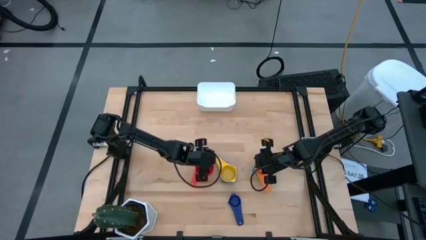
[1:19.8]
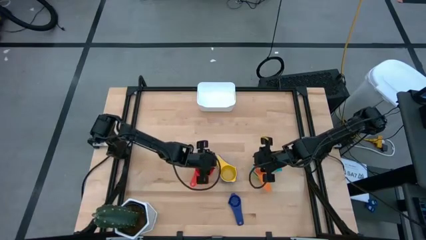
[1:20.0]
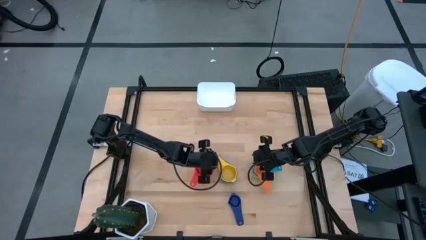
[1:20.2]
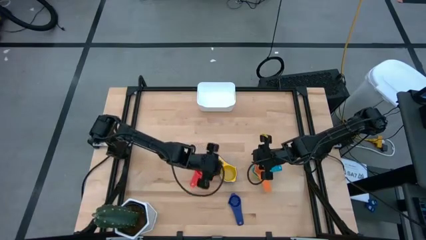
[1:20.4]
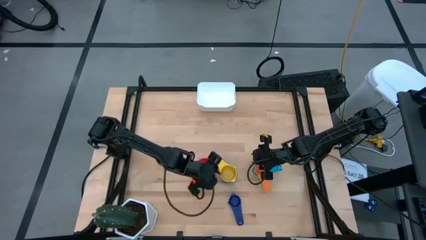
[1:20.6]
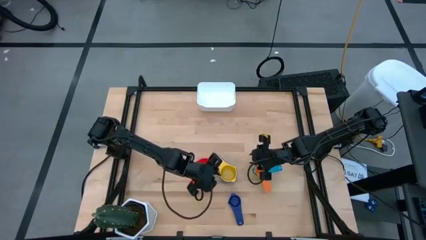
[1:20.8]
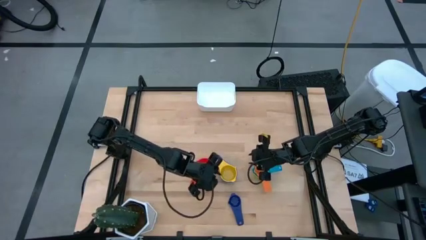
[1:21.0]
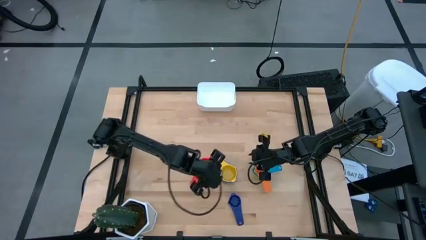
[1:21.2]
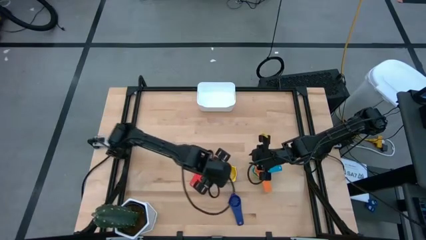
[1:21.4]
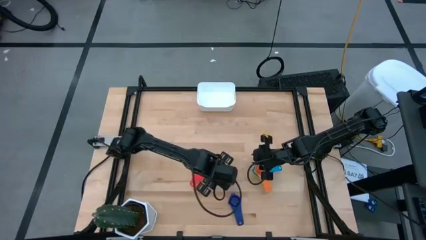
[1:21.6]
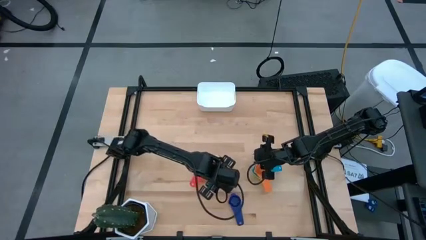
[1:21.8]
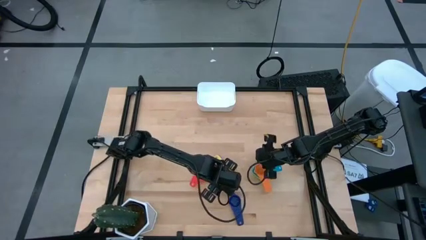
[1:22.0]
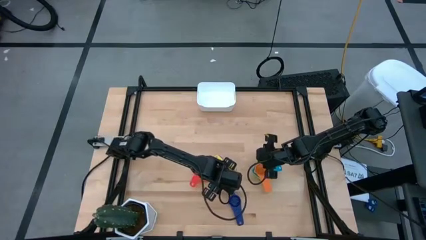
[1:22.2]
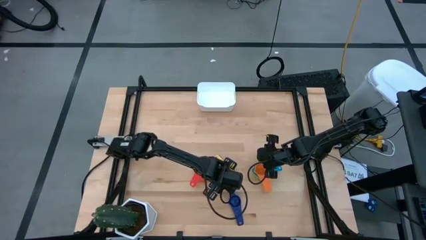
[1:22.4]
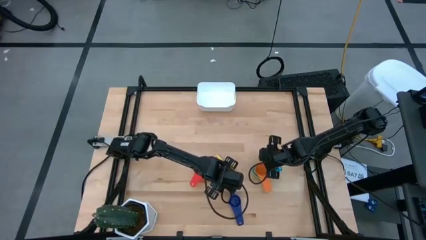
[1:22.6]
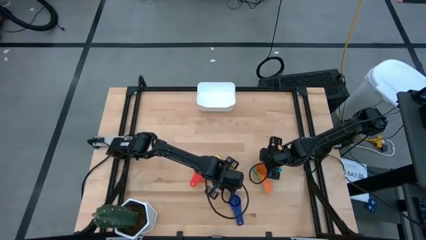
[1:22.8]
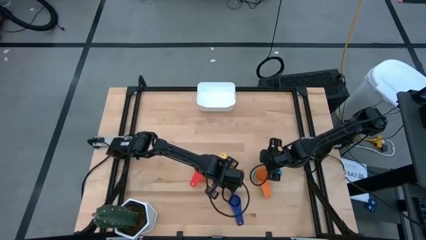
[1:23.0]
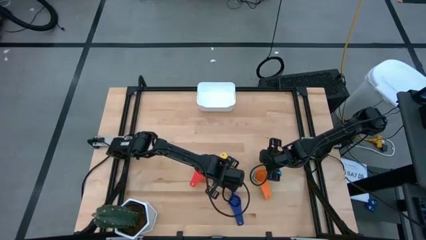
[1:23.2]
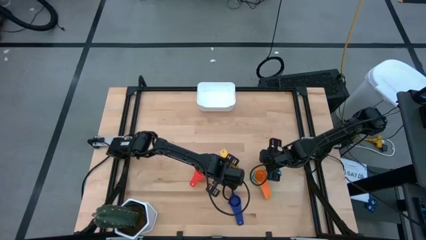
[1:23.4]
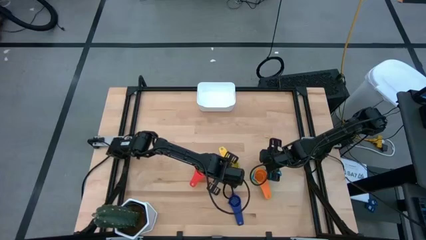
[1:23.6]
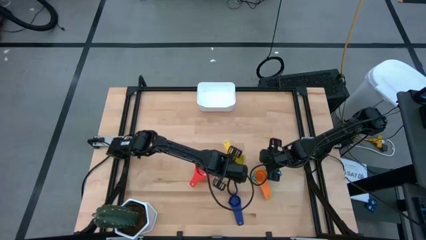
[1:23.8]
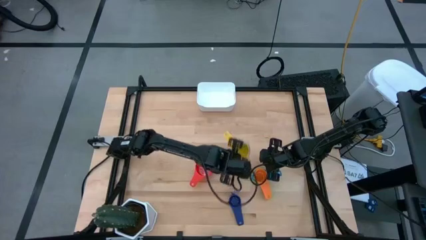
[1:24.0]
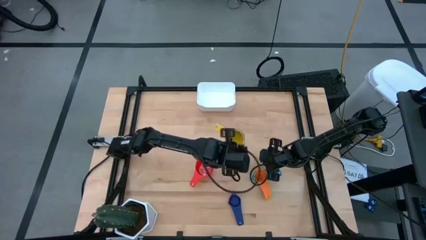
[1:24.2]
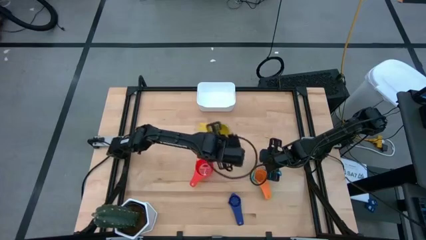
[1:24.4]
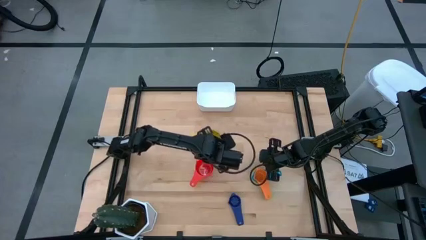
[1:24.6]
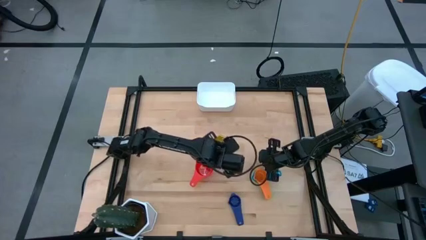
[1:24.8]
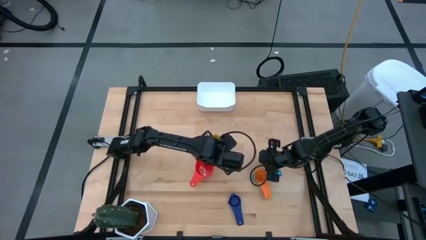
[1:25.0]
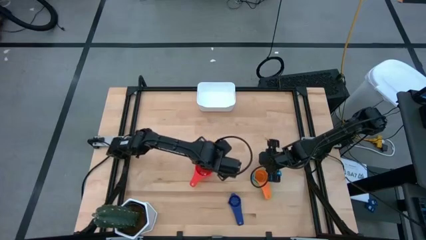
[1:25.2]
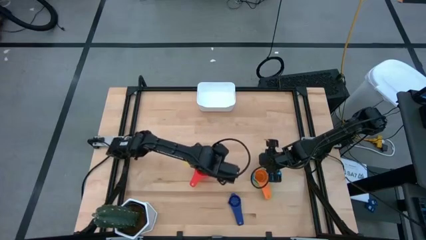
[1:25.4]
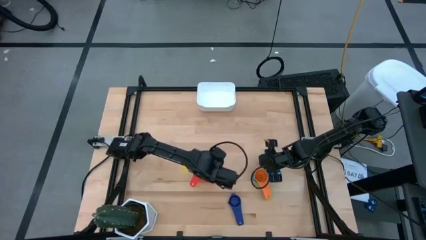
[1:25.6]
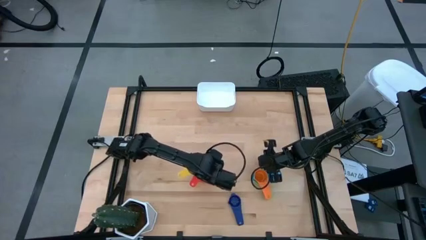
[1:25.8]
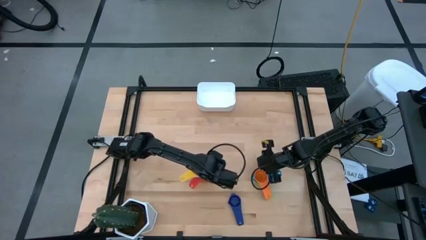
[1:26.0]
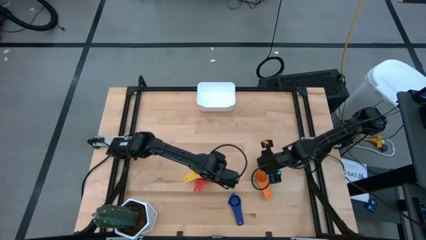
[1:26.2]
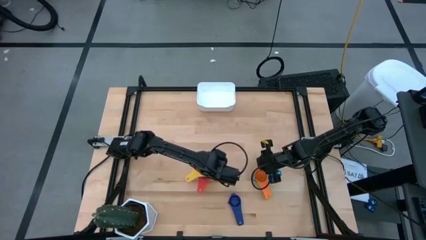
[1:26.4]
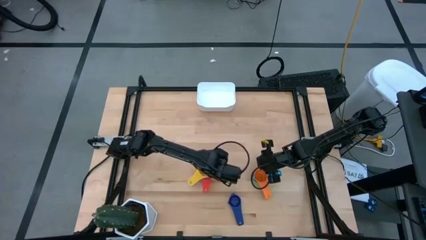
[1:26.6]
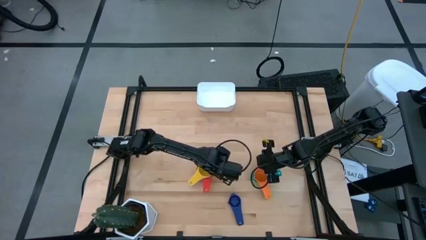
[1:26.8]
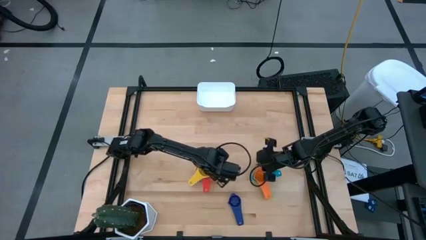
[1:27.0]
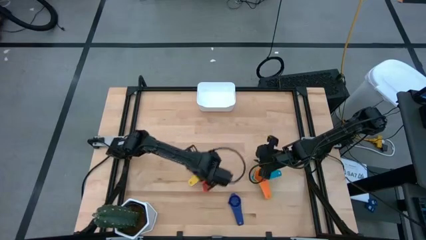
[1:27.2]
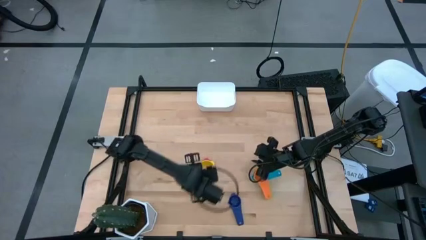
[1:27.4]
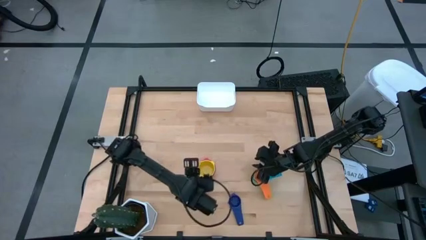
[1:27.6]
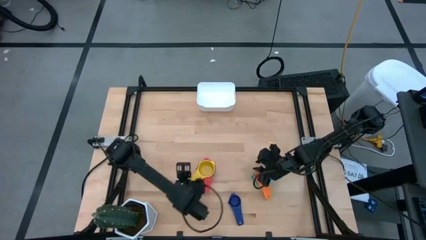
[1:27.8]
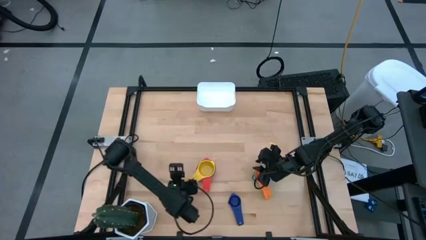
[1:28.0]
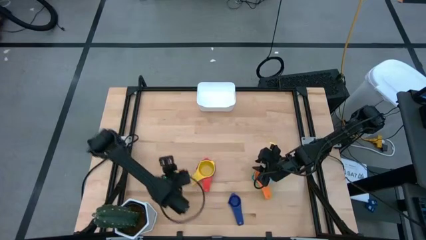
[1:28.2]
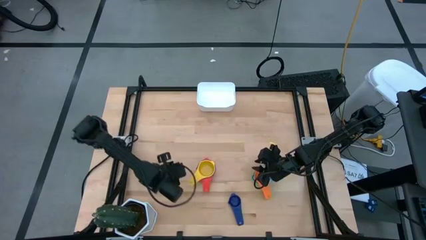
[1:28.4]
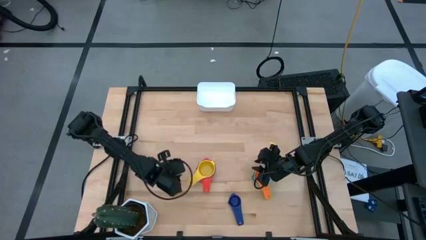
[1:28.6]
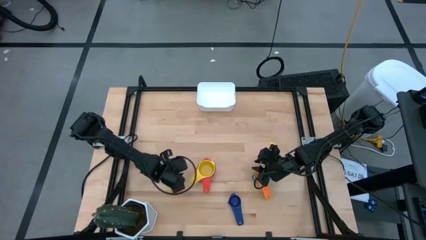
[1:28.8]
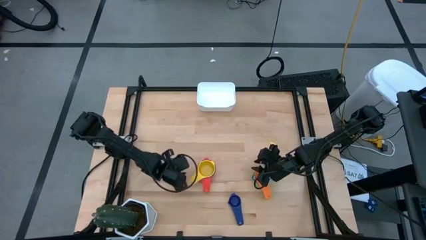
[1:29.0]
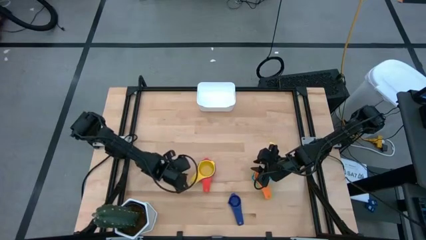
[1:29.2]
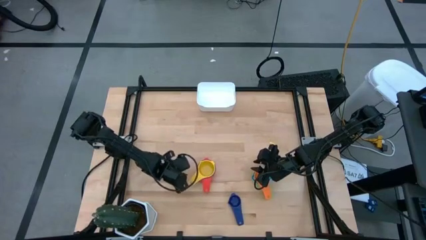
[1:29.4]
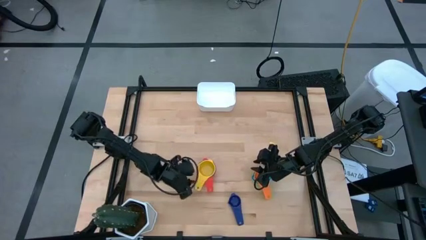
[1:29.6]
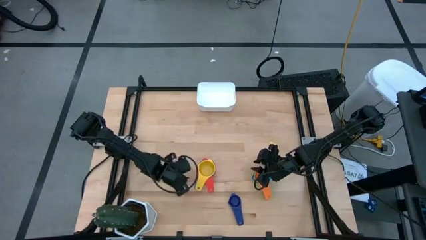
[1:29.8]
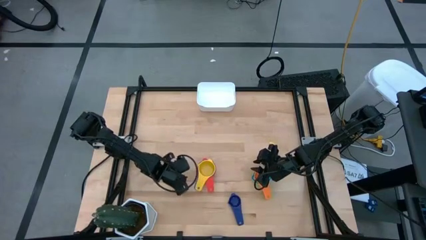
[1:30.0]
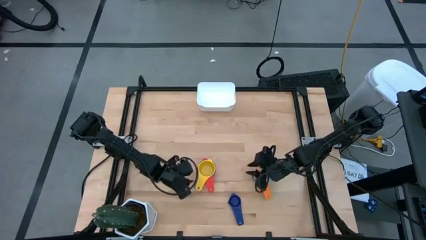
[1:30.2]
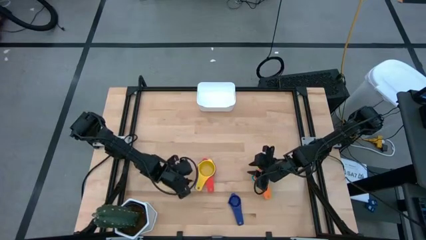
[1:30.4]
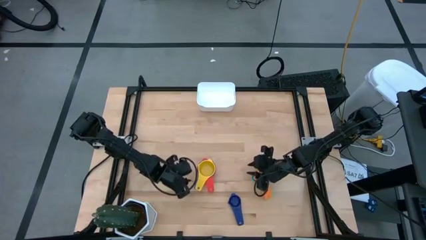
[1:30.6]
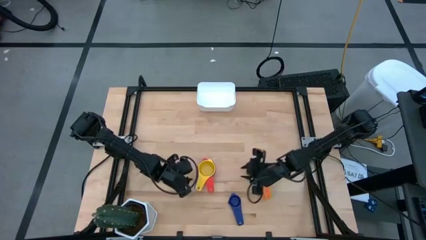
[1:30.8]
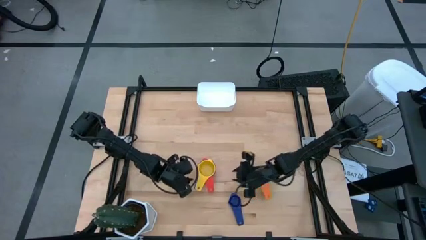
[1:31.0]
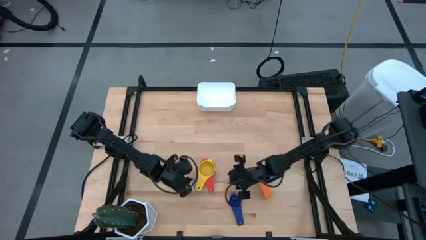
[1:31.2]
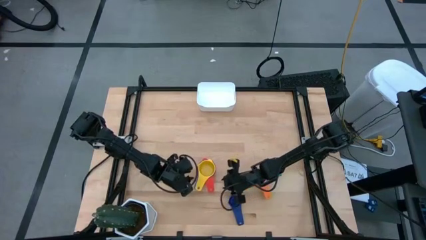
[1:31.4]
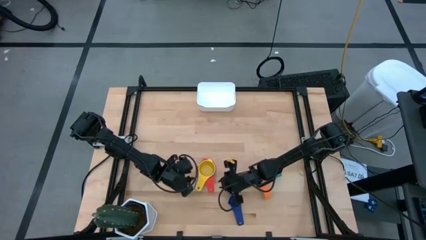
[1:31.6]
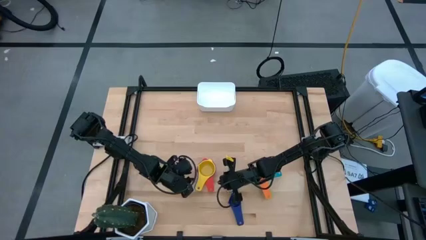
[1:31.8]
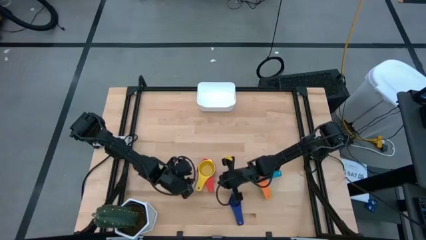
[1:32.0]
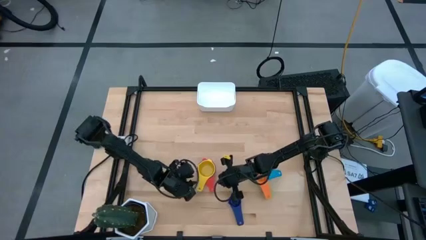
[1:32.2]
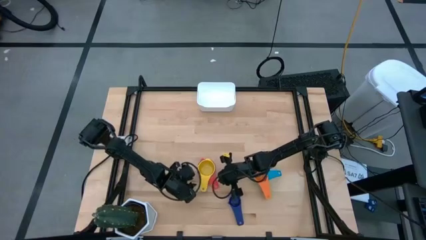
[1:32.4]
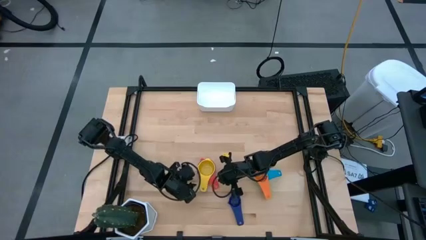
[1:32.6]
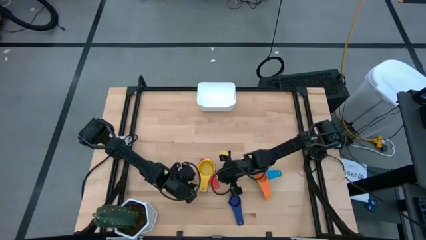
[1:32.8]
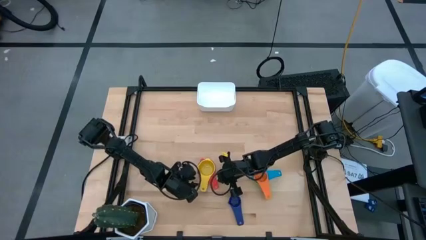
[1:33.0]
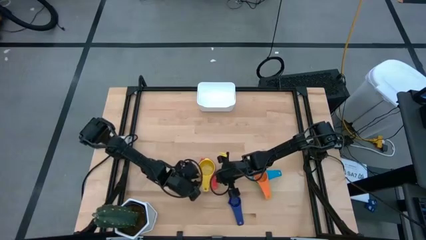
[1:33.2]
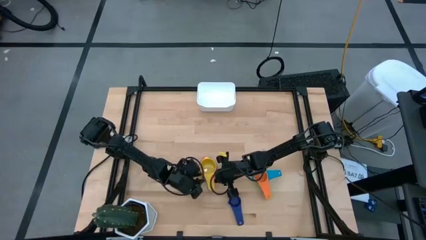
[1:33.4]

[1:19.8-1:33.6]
Task: Nest measuring cups in basket
Stack the left nested measuring cups on top of the red measuring cup
